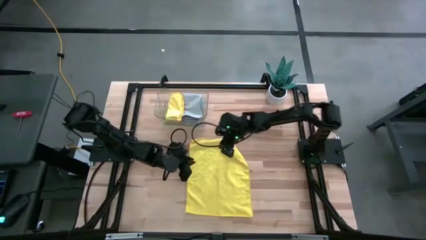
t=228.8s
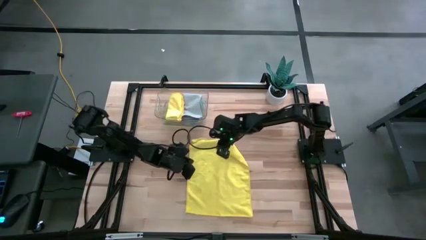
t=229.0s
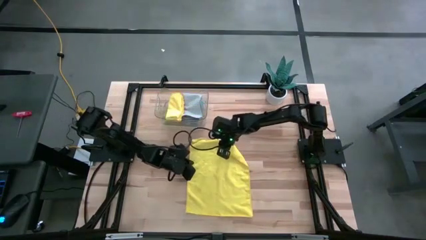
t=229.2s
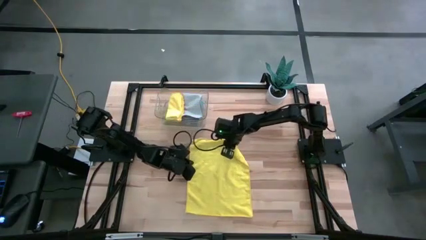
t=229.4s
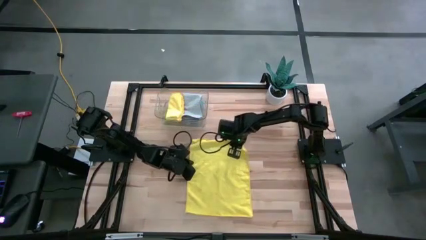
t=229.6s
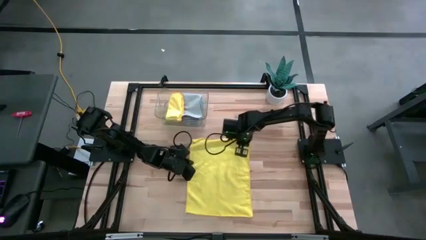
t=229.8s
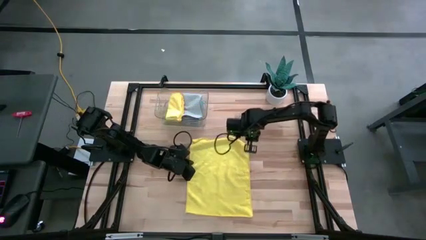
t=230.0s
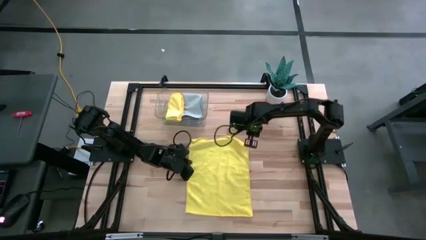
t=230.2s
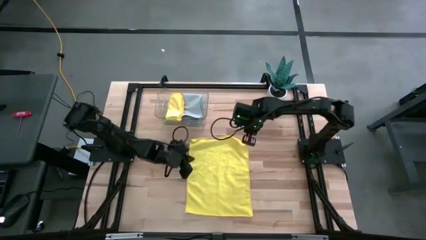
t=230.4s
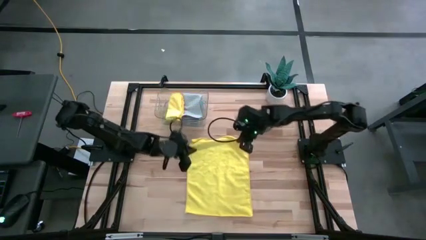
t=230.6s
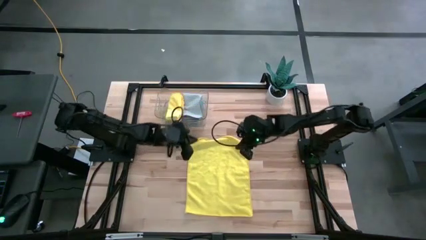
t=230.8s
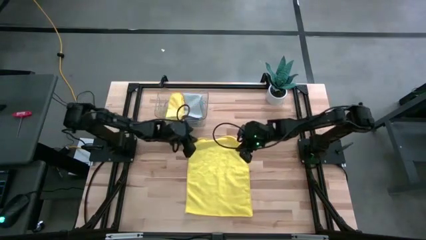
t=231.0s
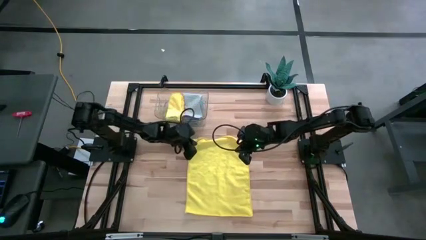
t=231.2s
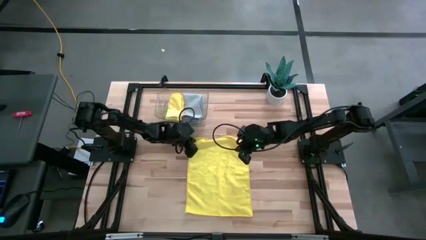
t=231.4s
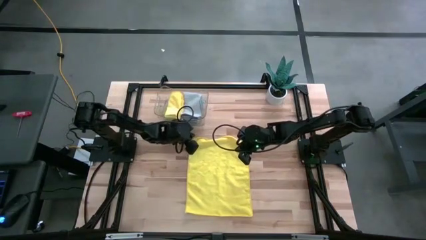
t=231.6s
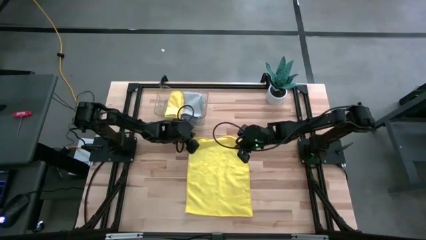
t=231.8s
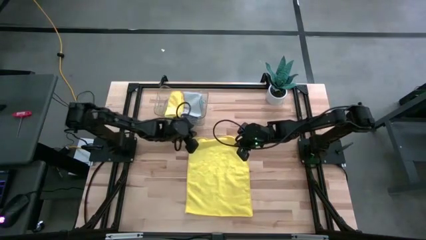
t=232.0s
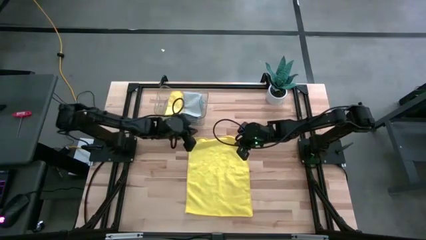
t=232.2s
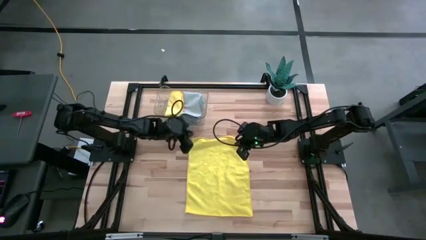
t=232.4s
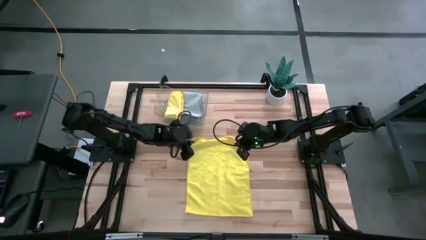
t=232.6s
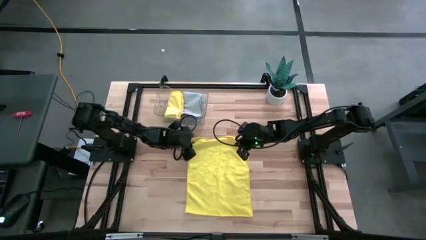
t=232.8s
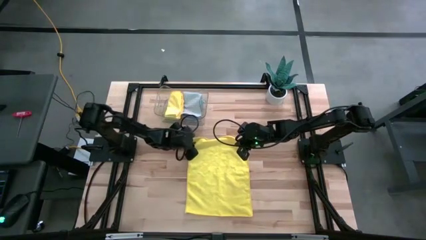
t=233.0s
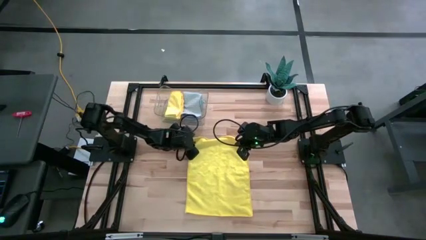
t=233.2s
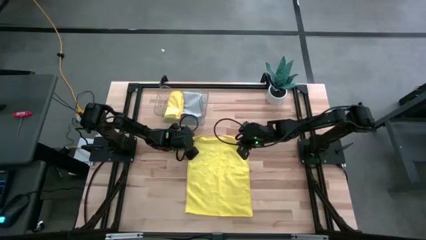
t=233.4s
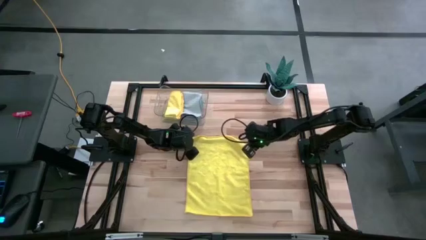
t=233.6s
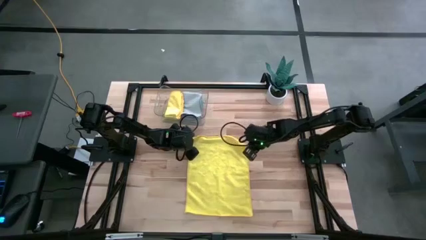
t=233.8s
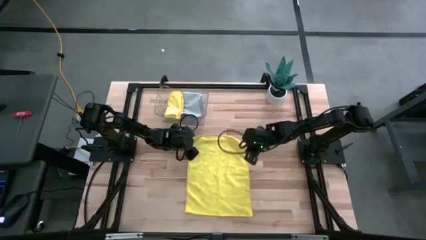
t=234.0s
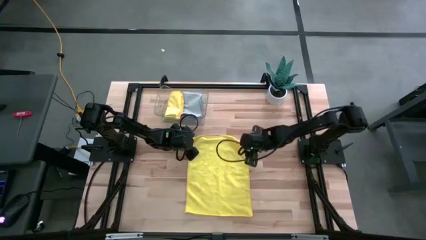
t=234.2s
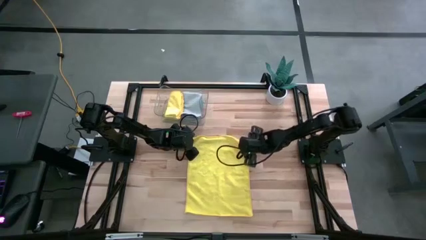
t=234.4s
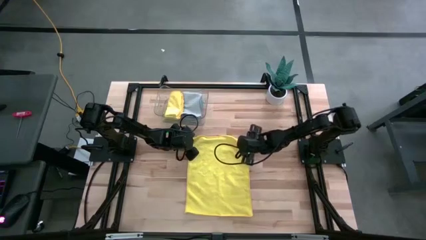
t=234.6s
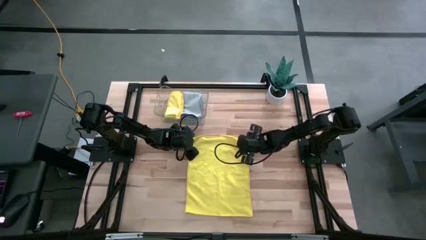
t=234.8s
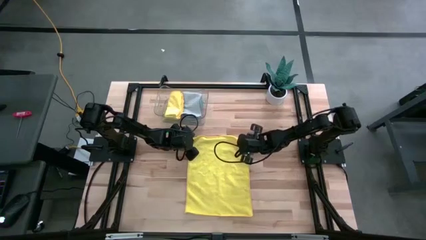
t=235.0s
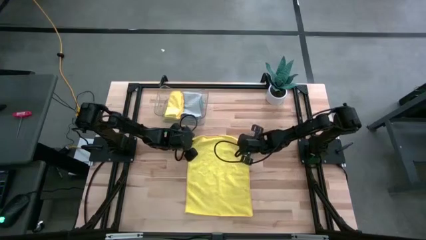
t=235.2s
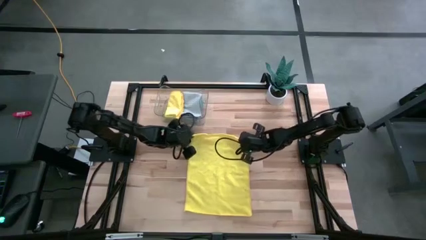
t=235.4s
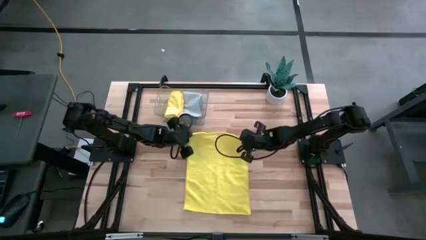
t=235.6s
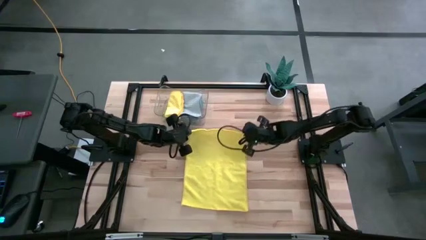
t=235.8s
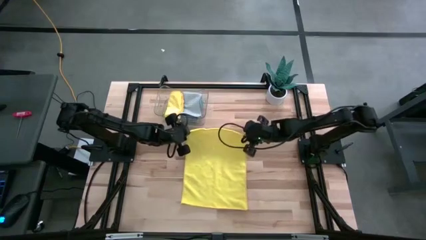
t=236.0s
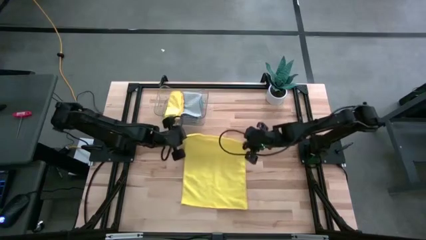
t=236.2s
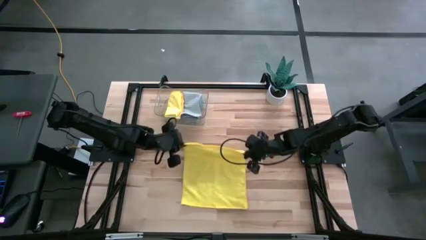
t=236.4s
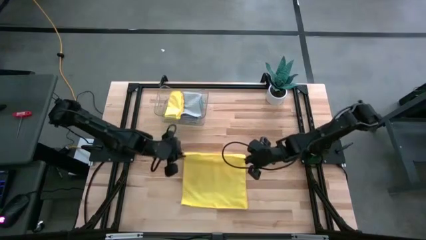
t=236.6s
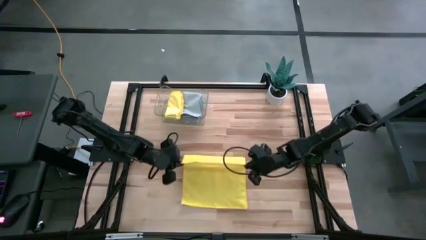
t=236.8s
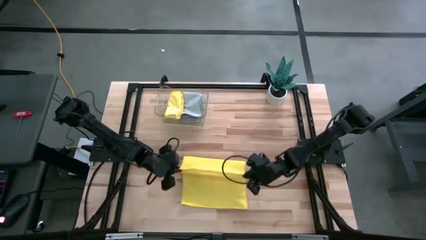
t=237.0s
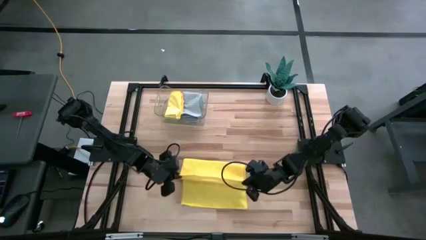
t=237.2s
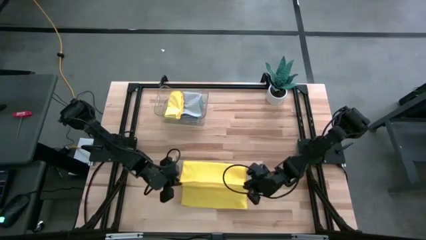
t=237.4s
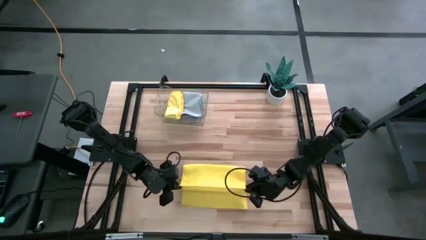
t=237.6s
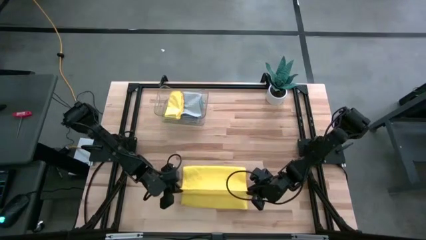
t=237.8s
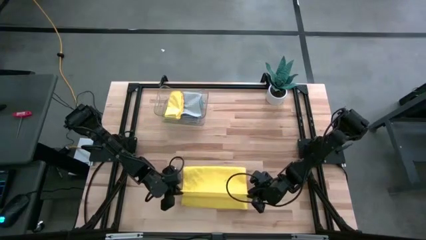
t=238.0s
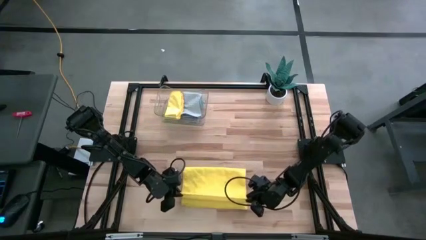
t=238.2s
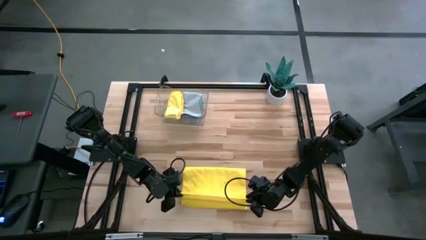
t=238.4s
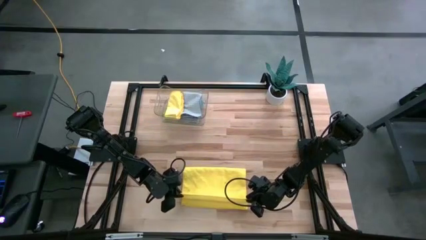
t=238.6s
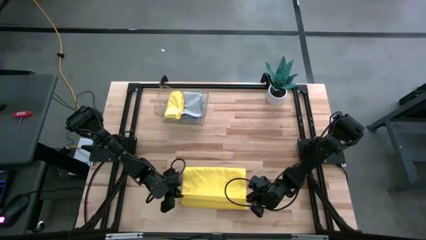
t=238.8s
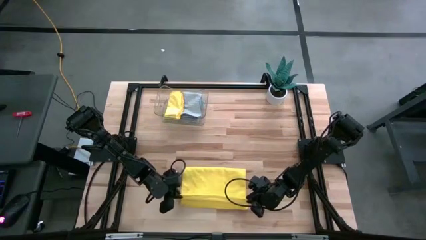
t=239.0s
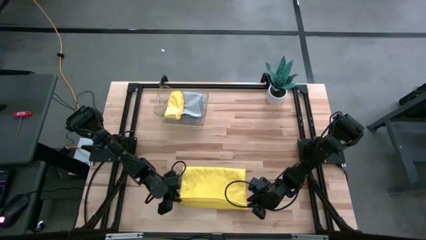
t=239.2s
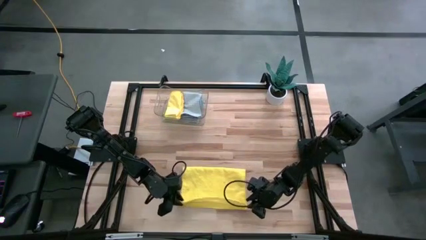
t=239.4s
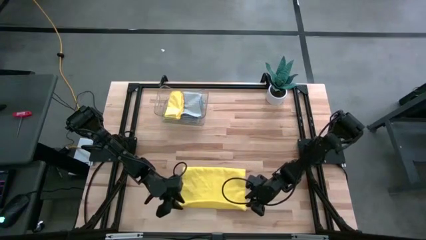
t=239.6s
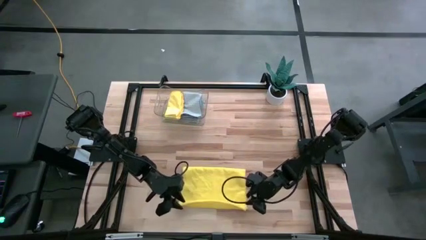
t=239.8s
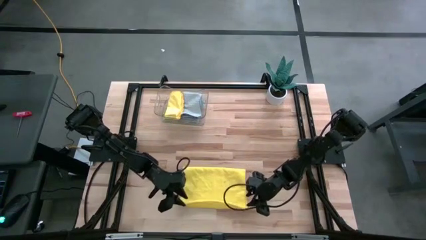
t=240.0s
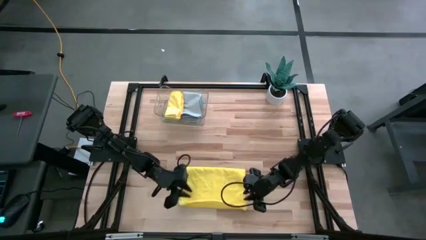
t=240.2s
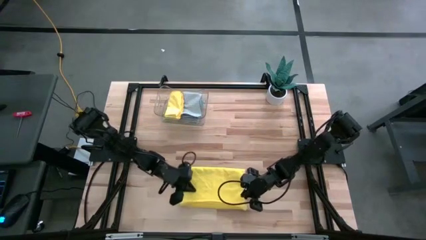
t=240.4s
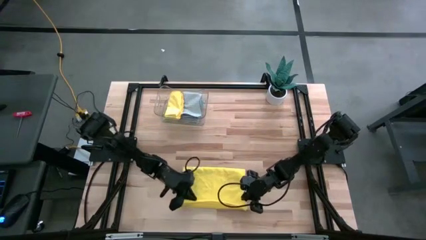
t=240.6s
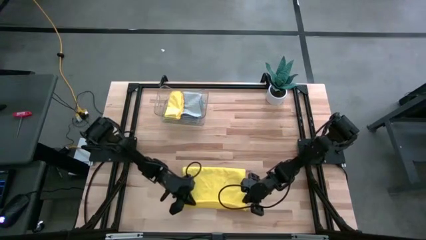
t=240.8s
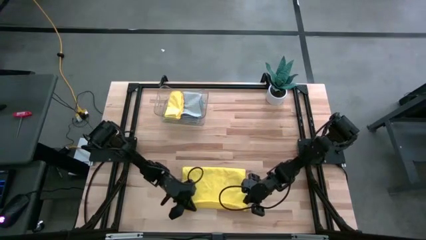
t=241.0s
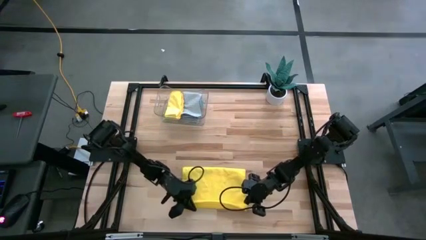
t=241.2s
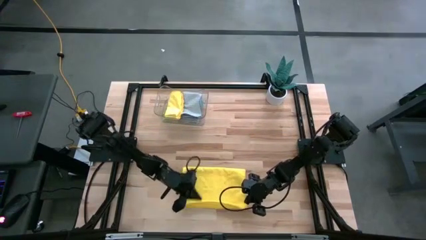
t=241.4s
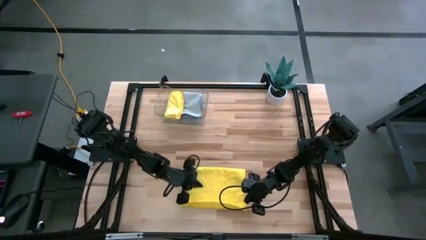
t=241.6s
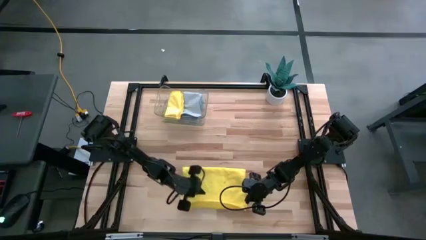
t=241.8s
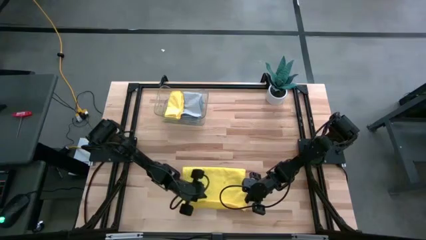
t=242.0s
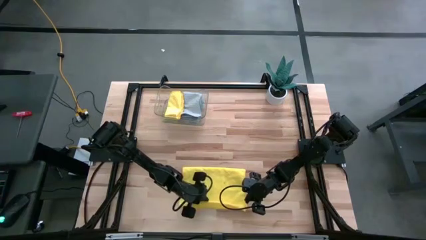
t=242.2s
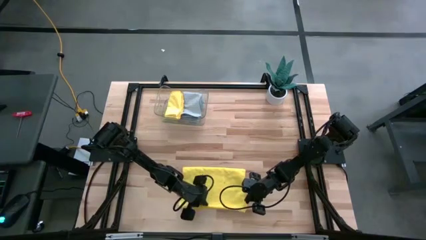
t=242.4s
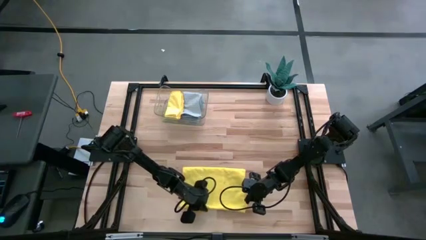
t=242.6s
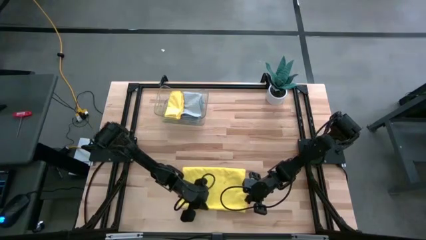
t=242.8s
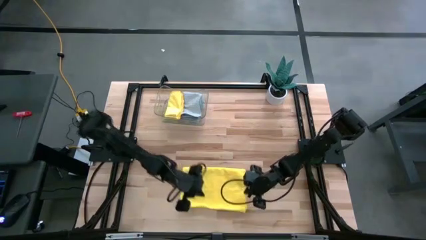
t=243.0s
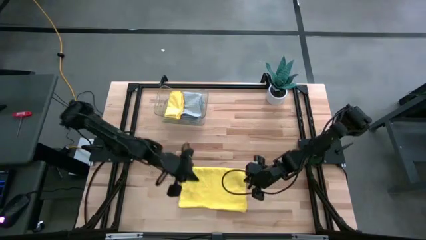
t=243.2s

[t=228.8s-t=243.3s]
Task: Fold microfiber towels
Fold the yellow towel
